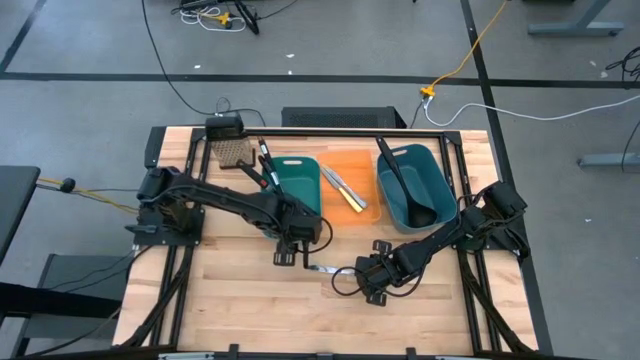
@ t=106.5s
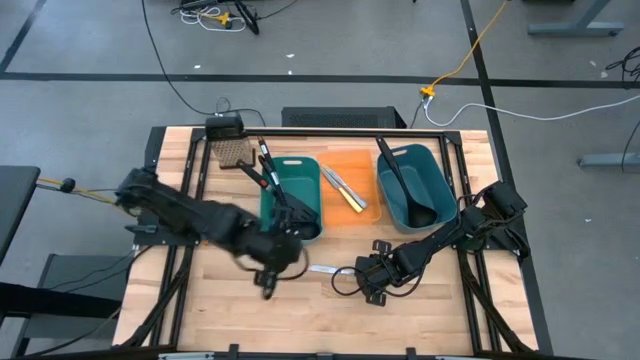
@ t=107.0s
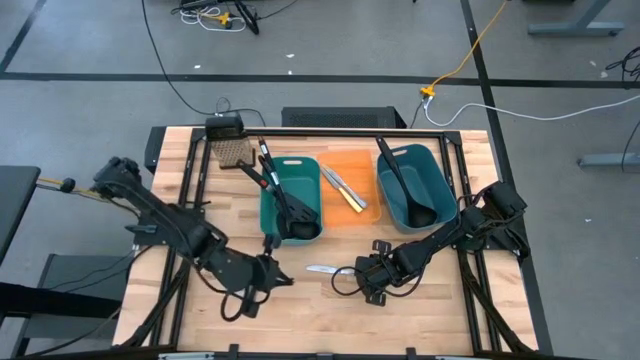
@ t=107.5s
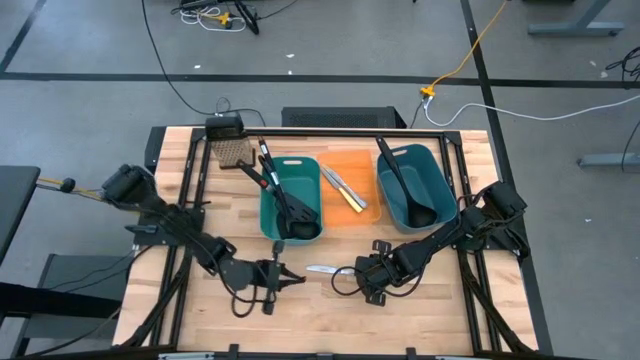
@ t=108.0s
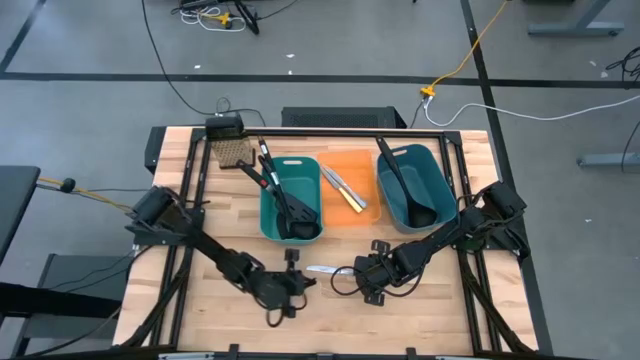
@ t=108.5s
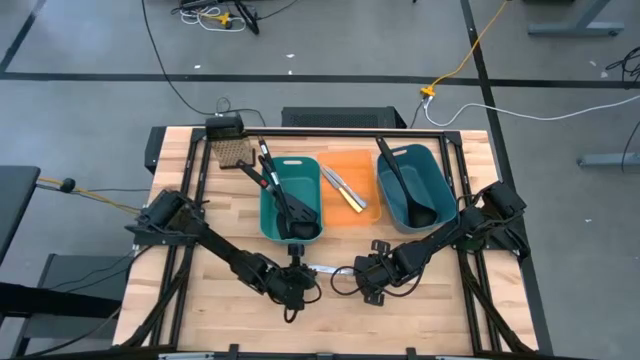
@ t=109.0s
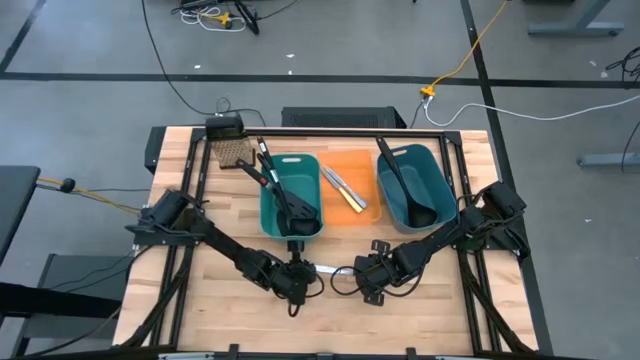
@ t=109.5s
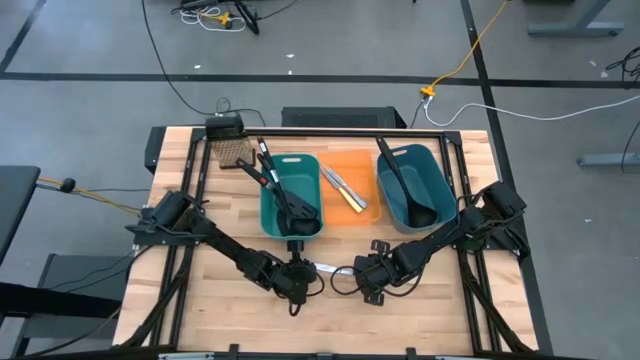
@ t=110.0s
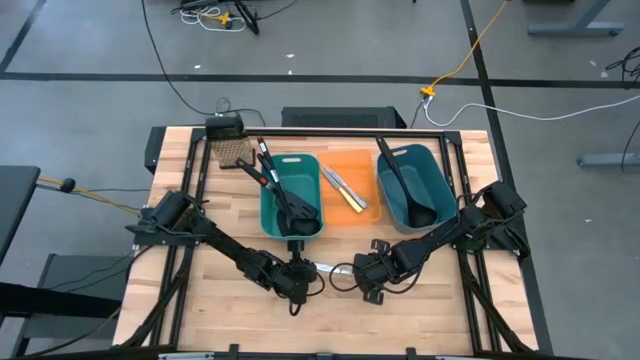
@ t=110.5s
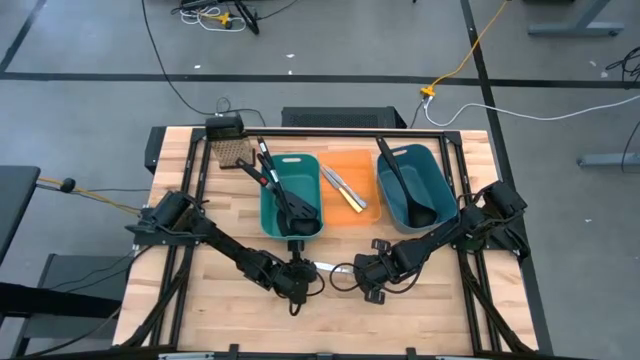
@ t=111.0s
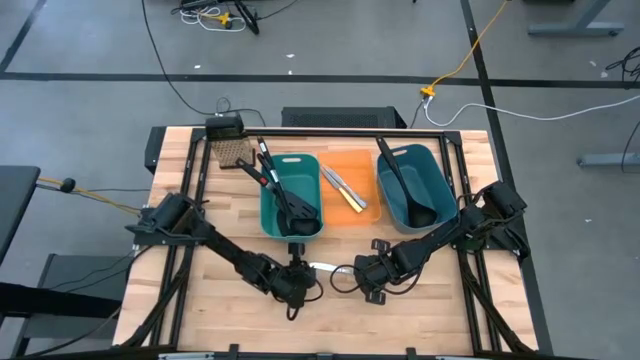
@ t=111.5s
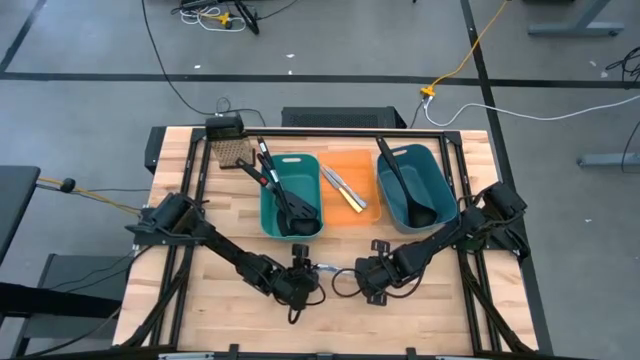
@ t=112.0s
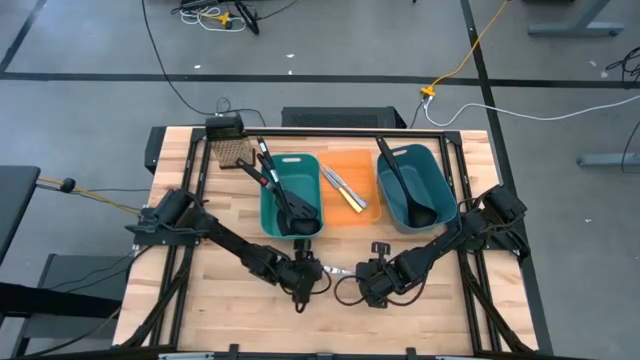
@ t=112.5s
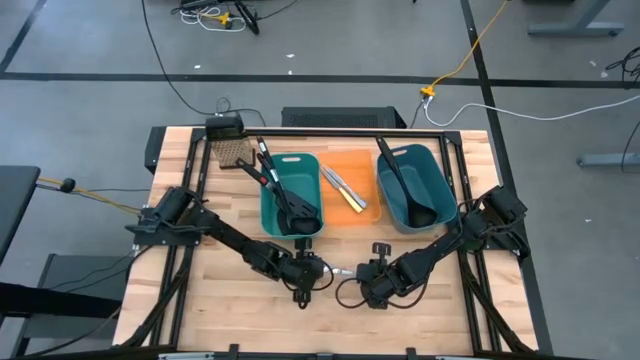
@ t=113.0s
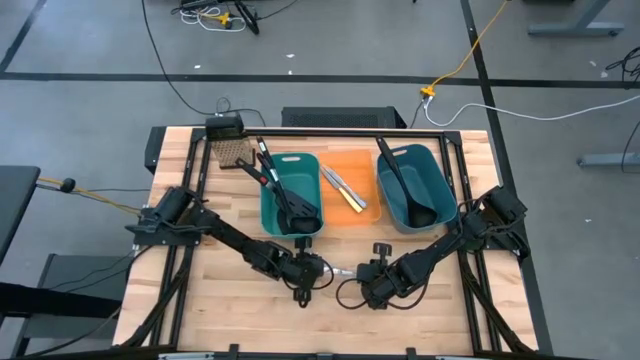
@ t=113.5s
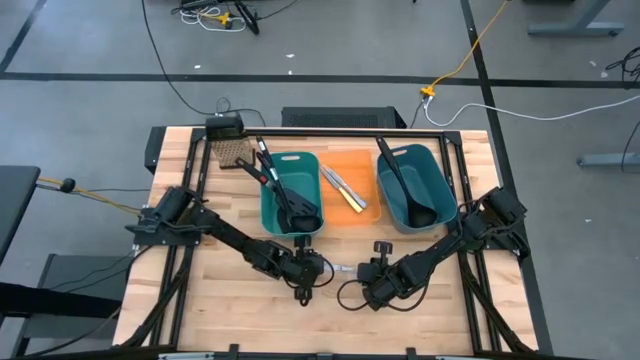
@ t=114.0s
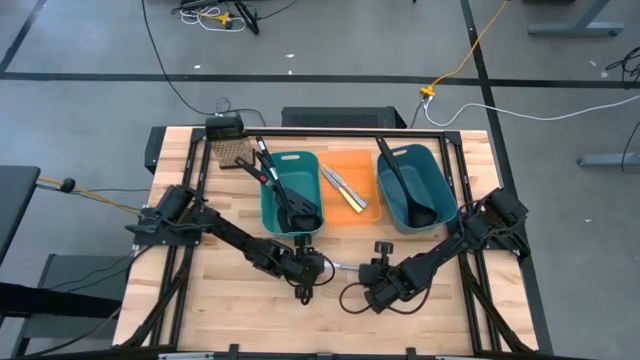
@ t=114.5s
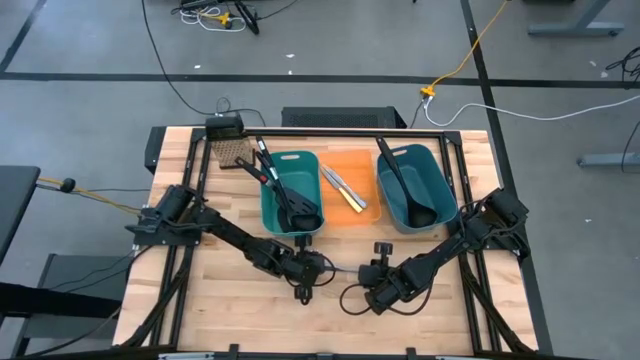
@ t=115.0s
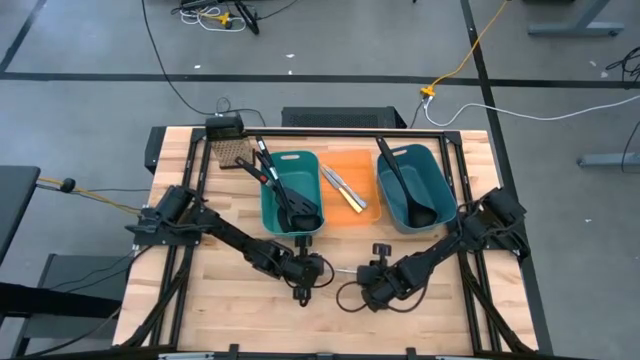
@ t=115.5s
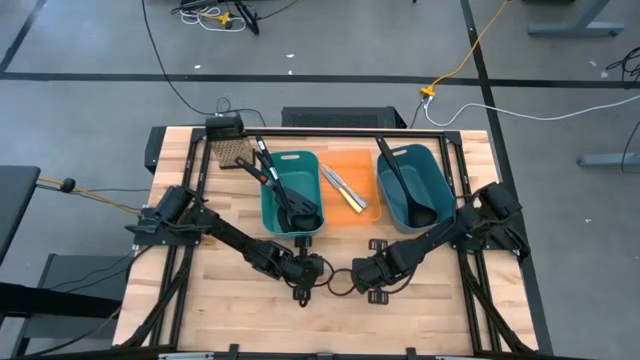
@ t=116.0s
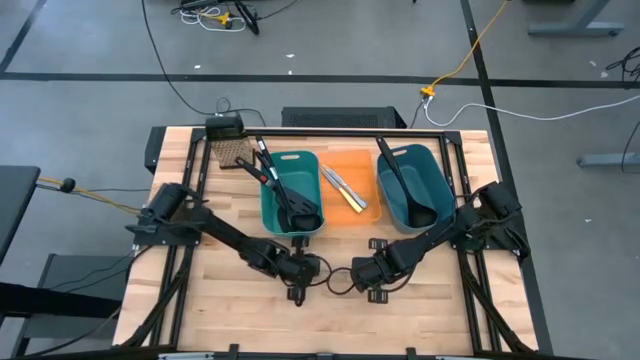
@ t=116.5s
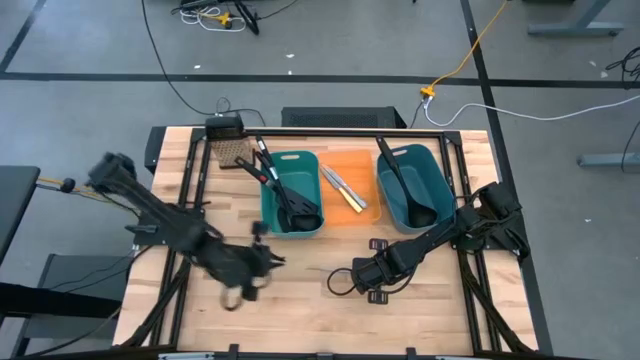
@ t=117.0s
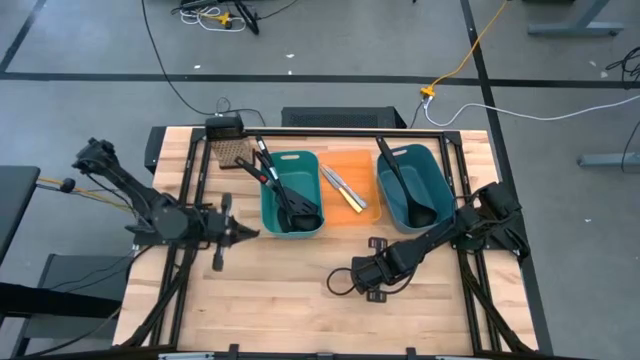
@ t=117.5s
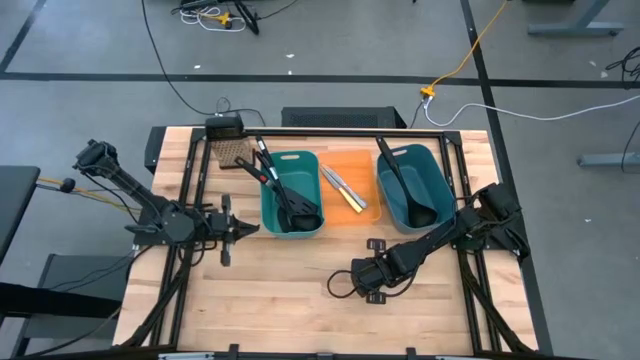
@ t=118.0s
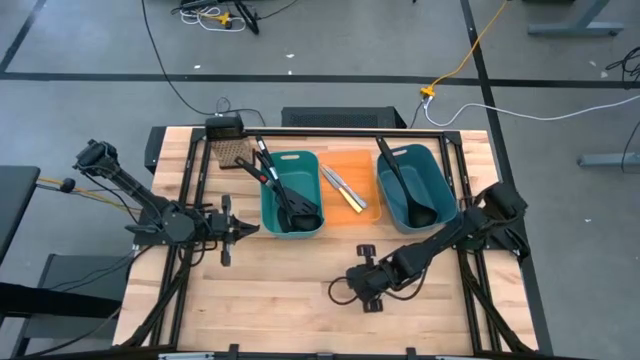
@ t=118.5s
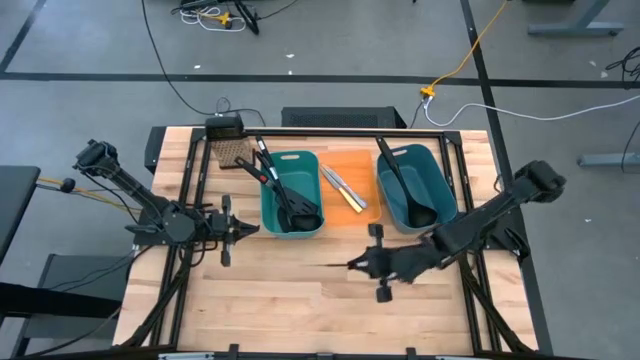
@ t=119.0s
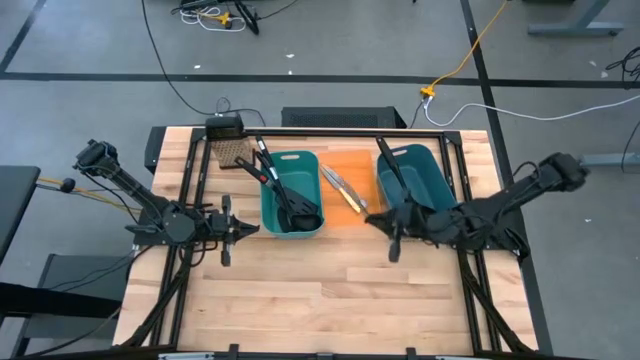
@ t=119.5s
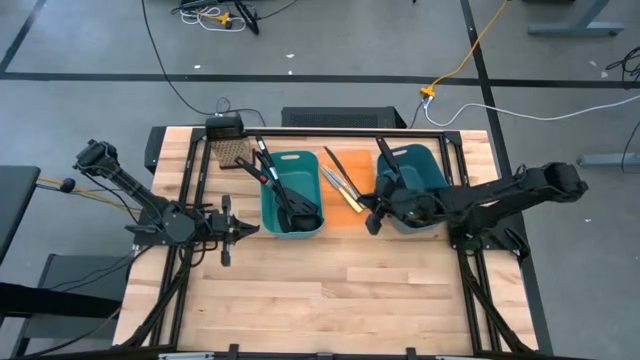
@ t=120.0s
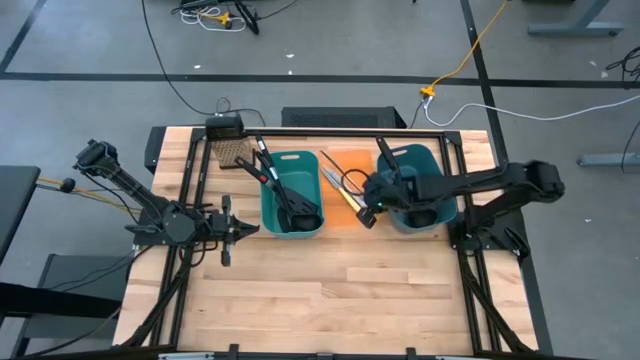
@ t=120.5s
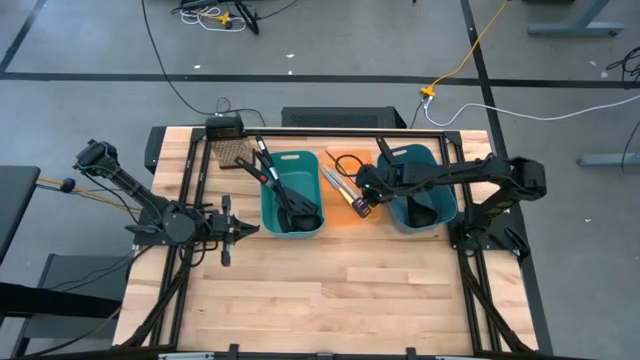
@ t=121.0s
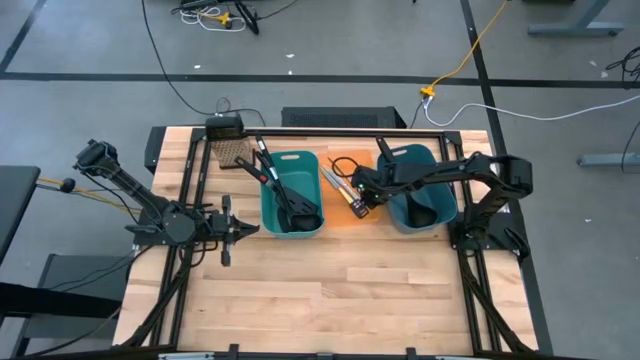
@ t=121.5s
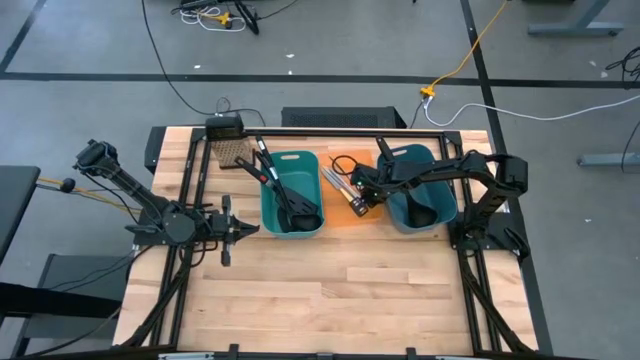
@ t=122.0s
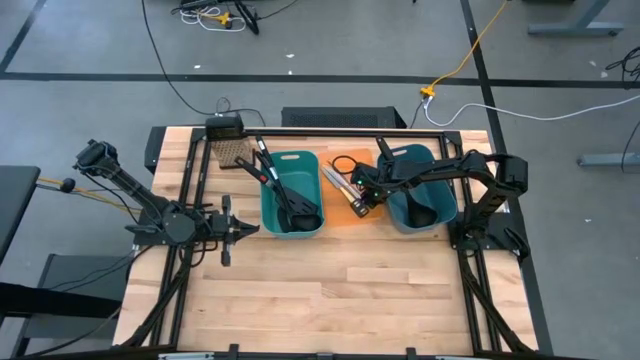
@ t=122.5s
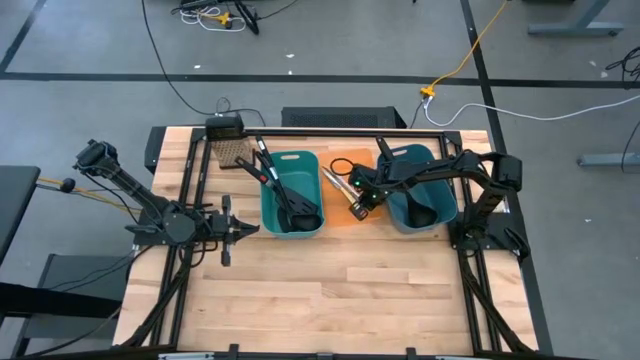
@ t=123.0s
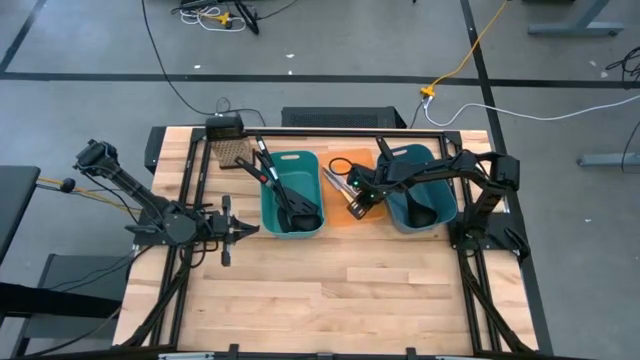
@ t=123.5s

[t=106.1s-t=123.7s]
Task: Pick & Place Kitchen Items
Put the silver knife into the orange bin

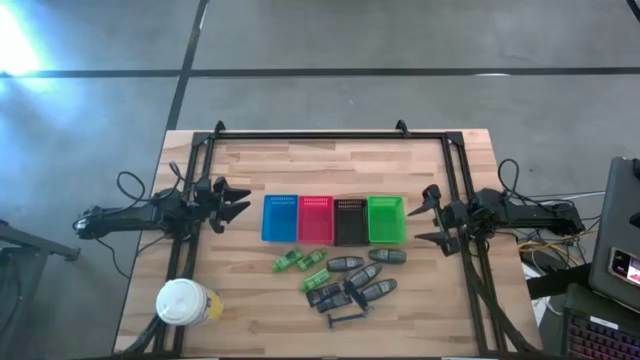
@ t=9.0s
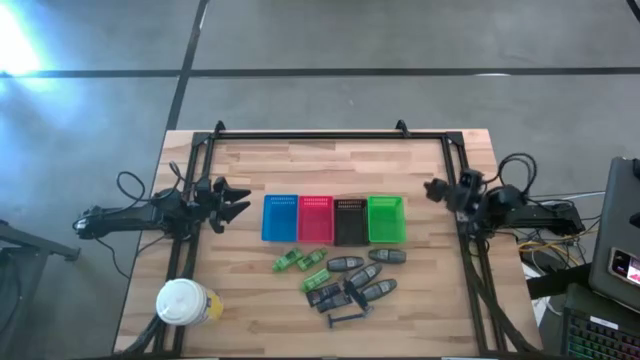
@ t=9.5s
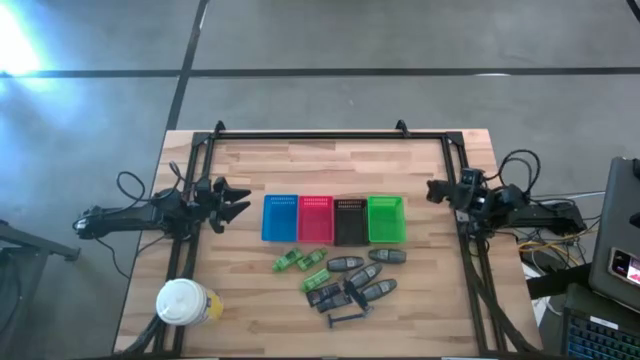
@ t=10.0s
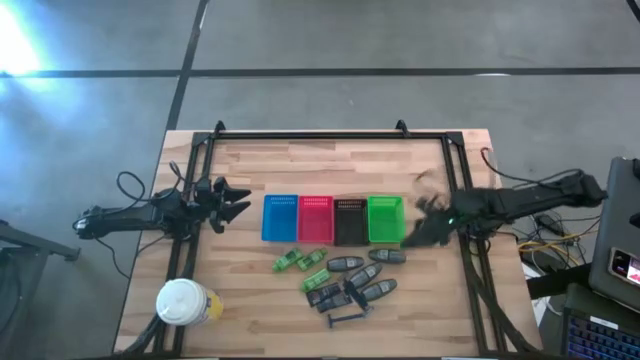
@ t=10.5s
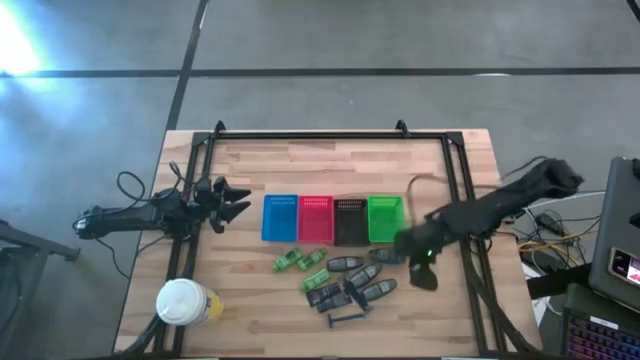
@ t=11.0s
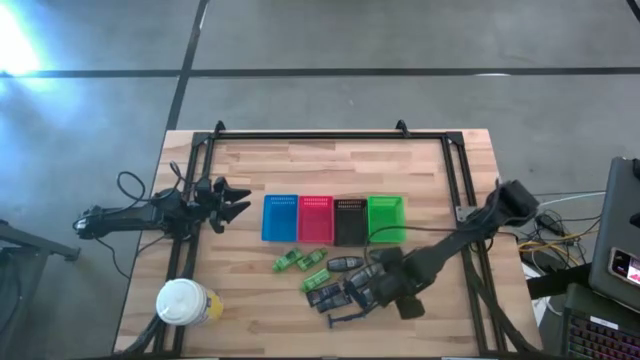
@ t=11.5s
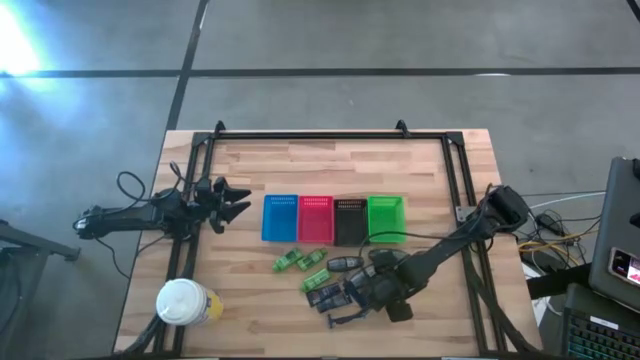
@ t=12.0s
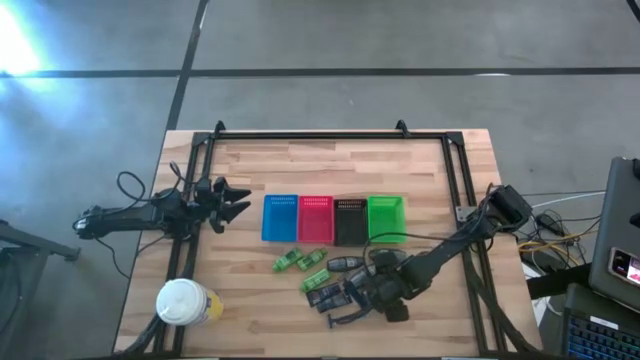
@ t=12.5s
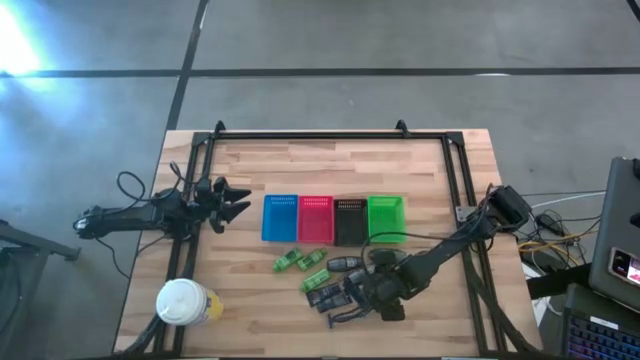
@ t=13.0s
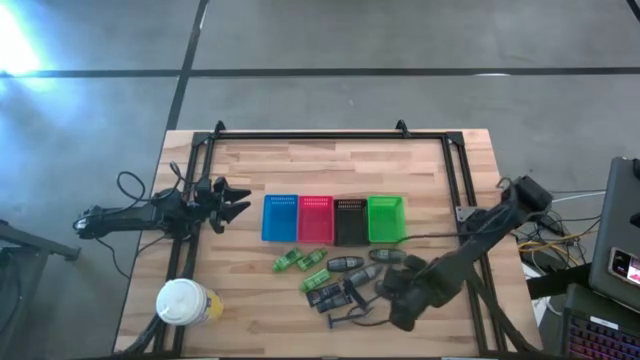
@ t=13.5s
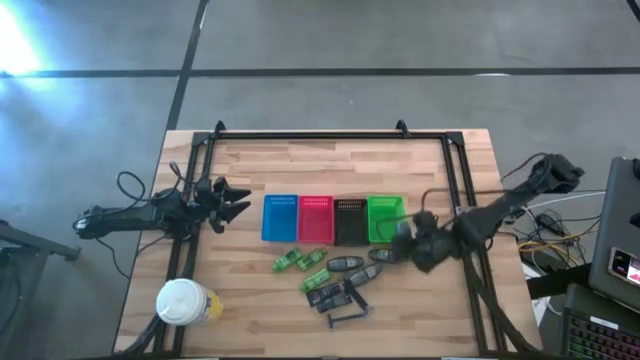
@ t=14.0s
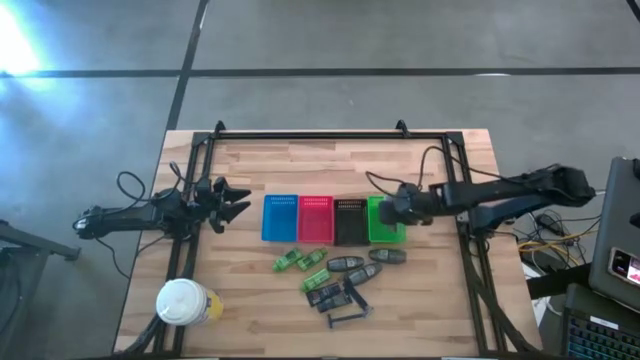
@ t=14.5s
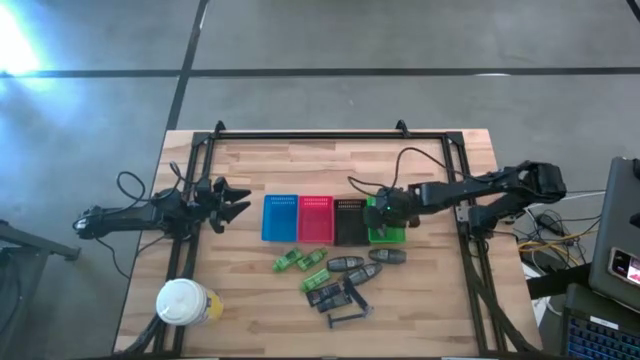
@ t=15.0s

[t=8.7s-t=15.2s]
Task: Pick & Place Travel size toiletries
Put the deodorant into the green bin
